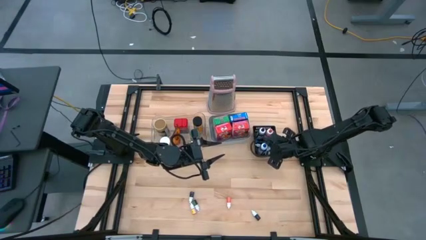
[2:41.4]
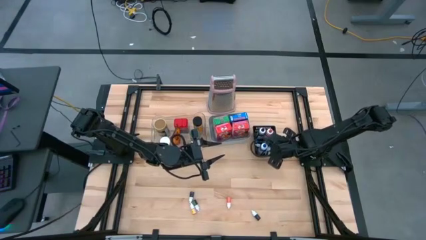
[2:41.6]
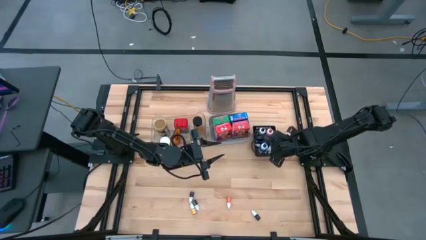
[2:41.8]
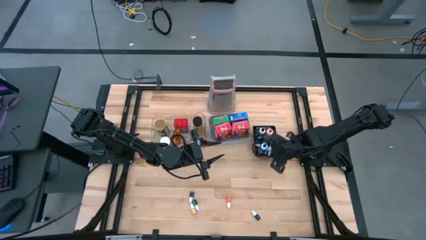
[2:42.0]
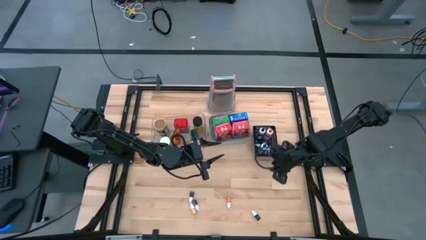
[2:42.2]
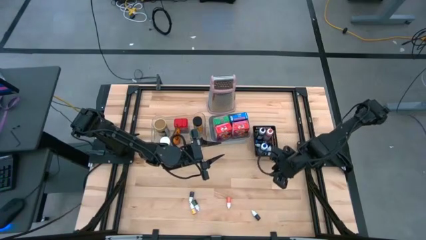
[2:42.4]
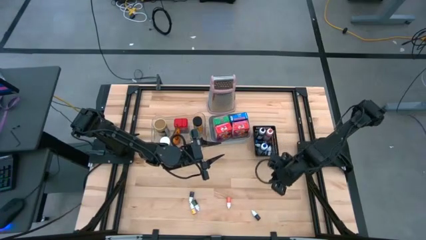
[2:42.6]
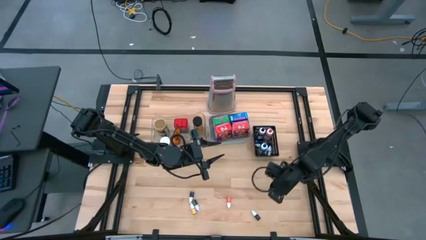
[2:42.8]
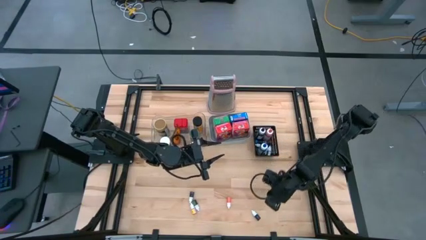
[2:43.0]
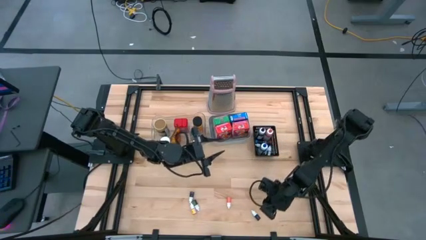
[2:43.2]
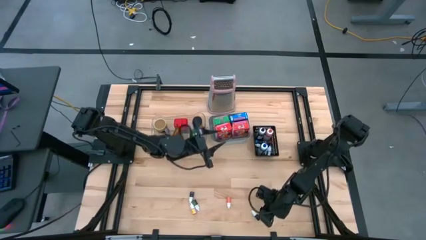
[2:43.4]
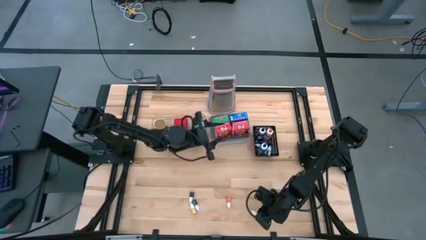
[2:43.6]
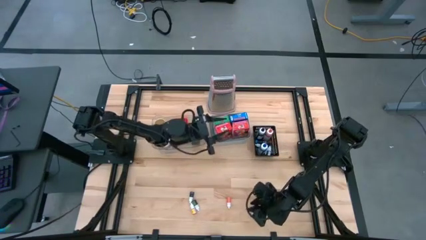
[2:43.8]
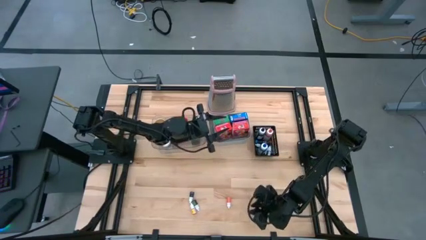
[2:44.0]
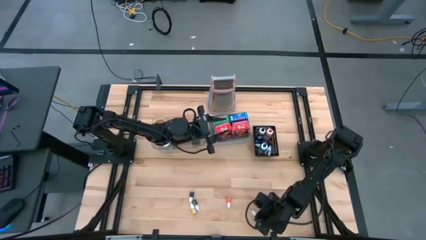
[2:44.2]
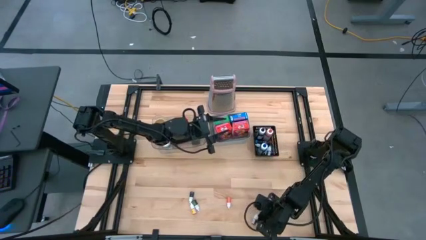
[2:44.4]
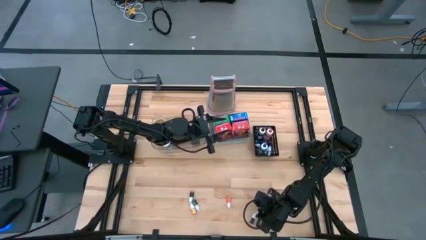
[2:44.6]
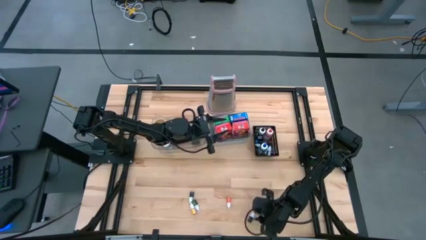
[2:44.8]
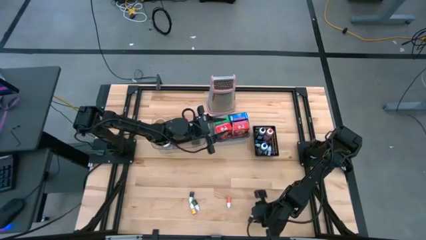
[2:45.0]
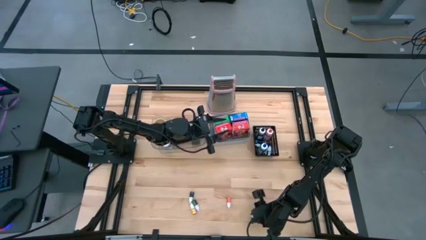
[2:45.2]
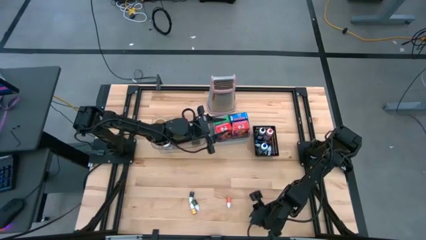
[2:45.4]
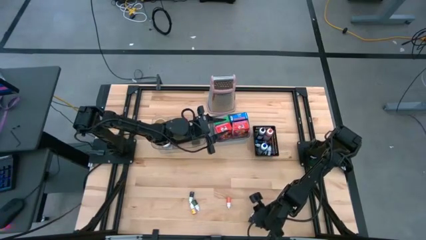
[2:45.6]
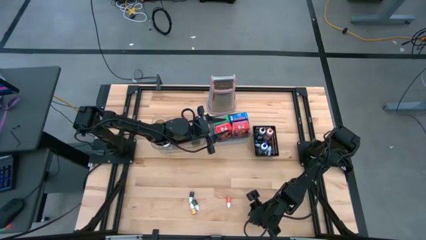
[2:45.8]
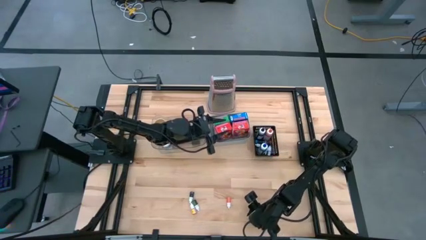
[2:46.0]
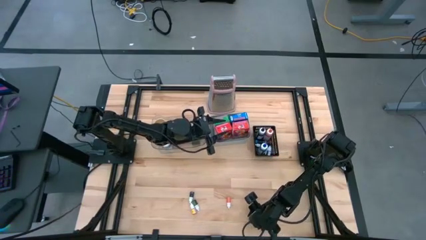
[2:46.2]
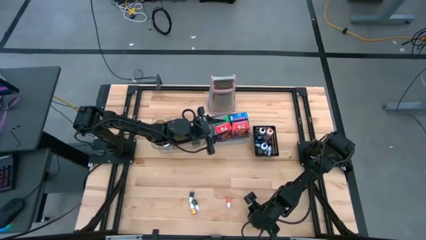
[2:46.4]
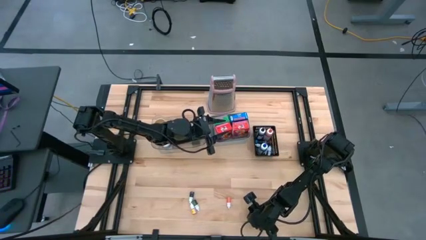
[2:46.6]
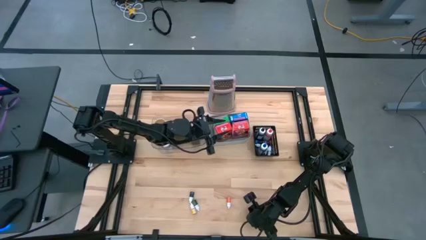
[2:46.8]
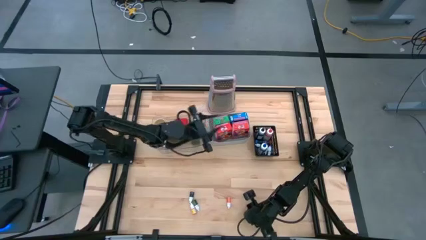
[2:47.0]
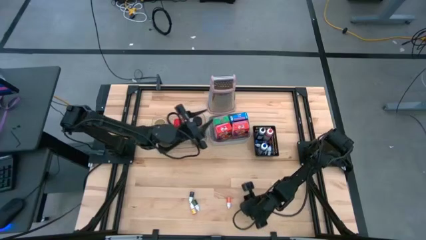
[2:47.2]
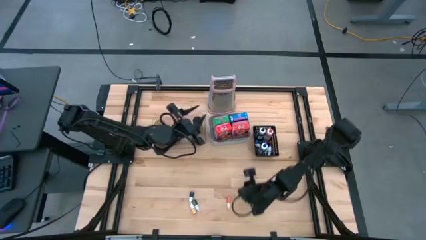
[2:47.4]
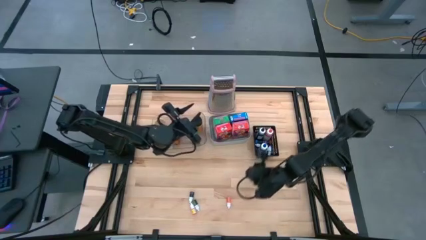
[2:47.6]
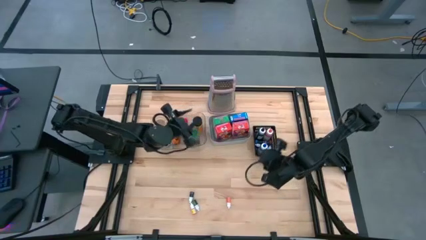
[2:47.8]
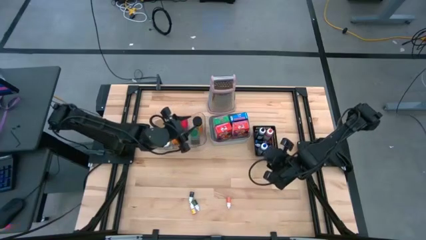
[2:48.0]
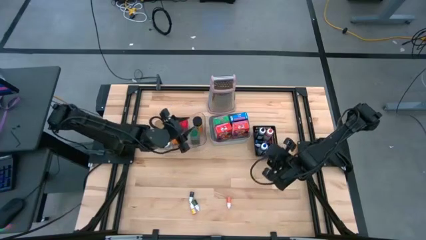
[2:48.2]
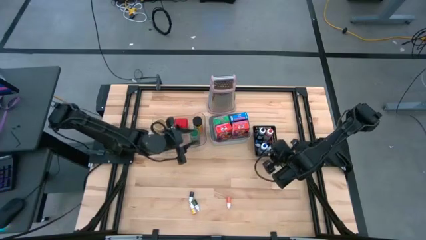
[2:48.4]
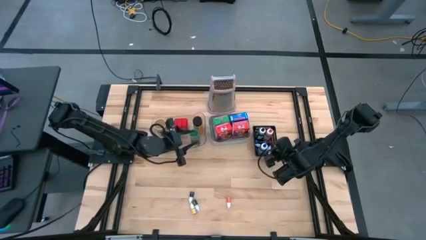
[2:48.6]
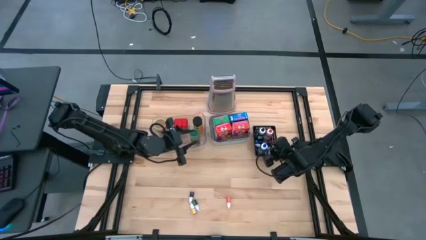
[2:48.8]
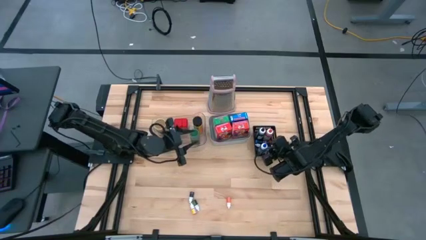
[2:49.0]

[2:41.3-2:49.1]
Task: Pick & Place Kitchen Items
Put the small red food coloring bottle into the black basket

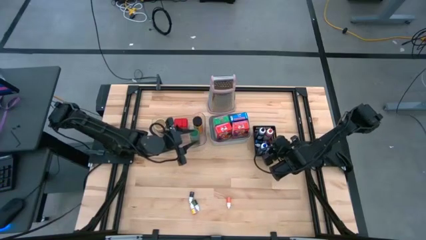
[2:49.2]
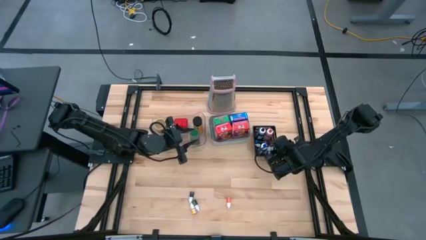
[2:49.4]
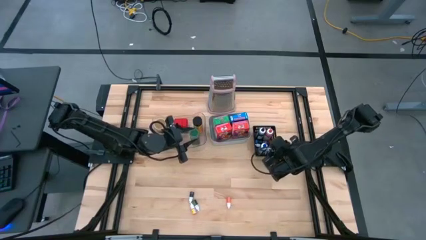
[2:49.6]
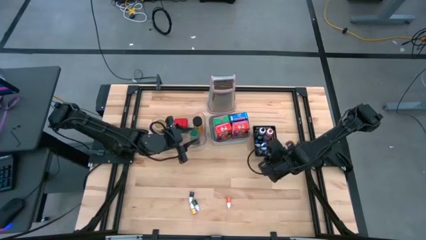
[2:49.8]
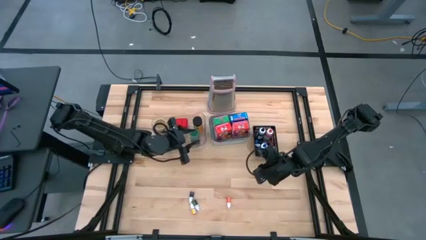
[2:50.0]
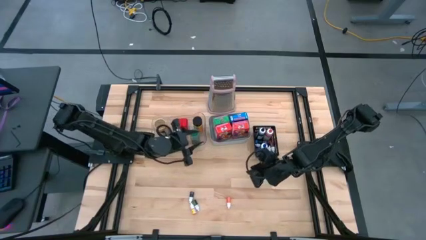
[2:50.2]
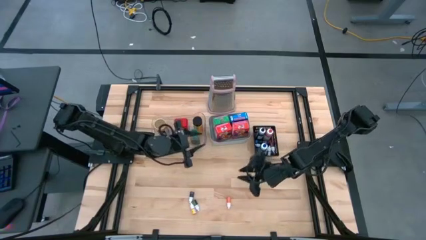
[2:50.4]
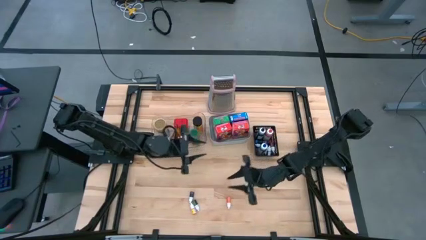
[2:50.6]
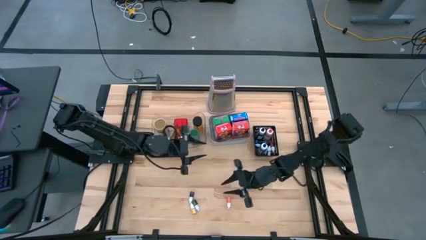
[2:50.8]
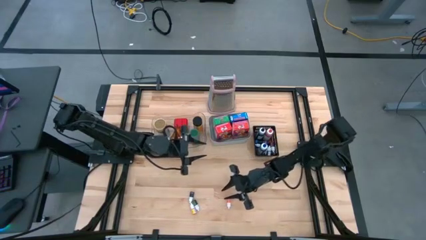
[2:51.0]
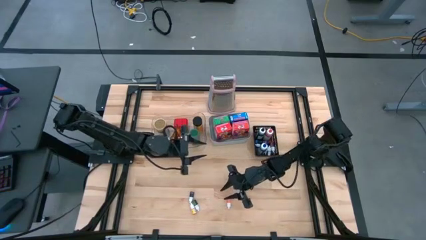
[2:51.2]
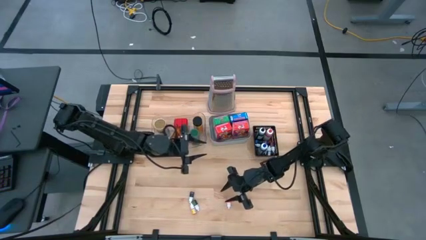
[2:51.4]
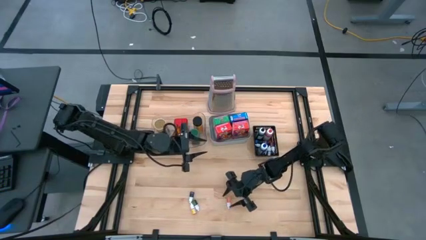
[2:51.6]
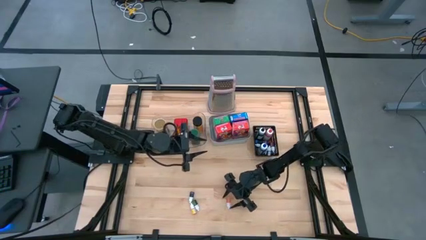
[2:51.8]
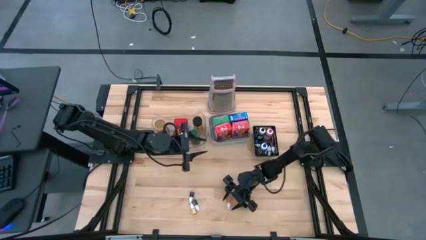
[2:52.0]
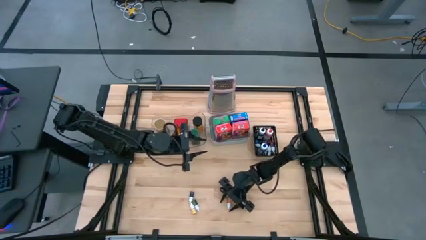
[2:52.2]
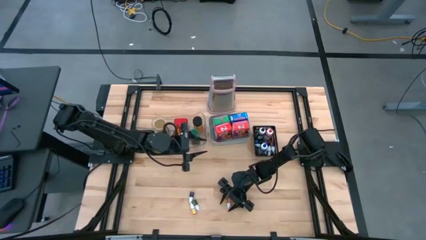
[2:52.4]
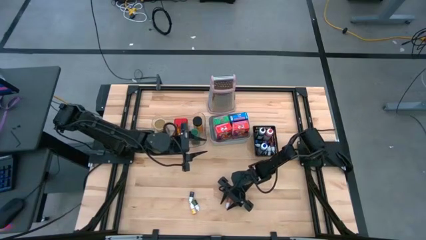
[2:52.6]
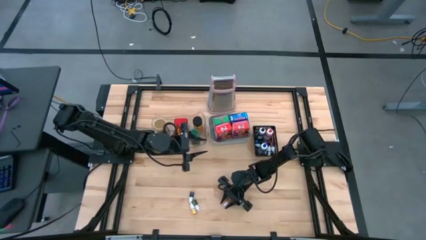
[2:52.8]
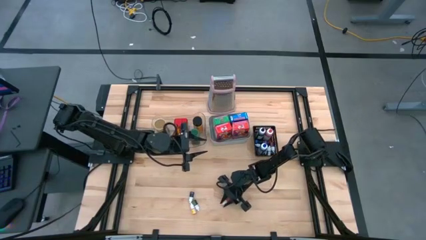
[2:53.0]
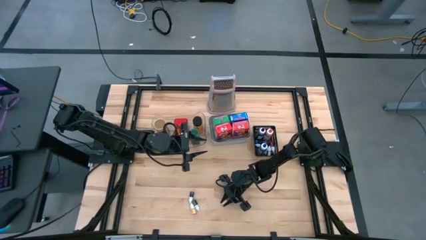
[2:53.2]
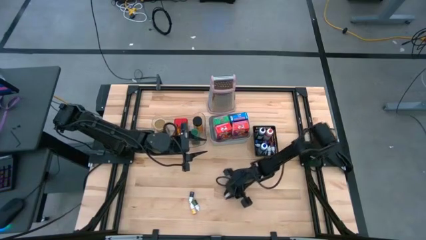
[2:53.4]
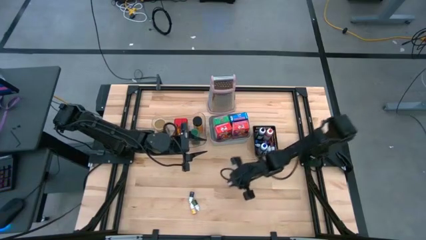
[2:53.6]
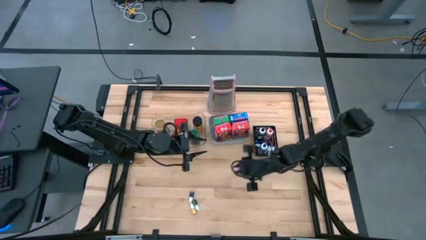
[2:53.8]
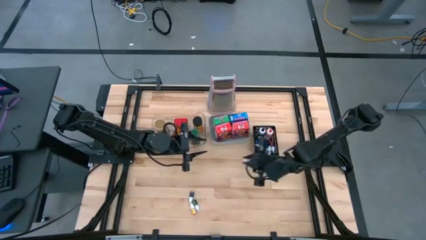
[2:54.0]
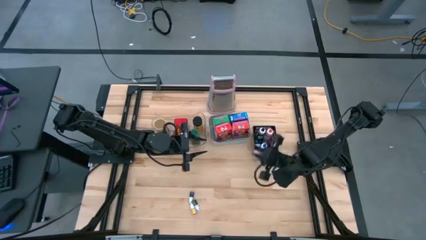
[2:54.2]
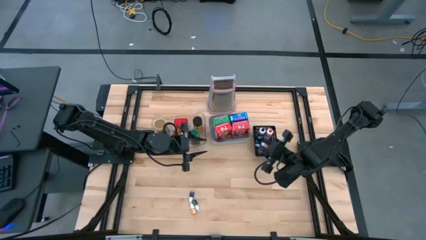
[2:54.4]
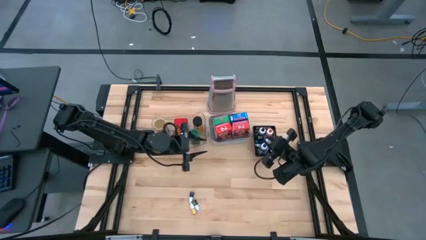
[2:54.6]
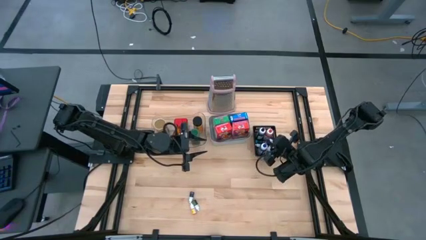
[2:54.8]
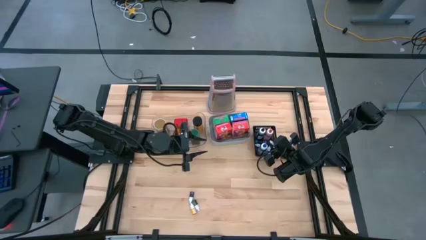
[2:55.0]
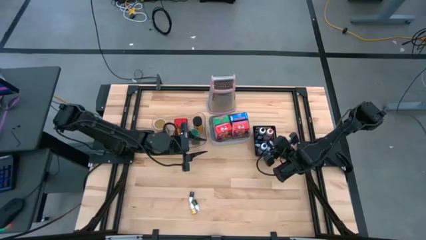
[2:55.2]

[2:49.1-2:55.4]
Put the right small orange food coloring bottle into the black basket

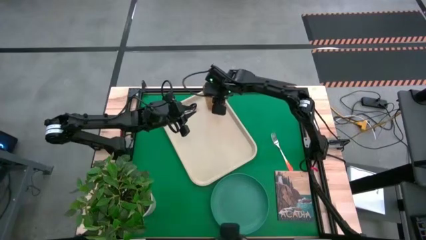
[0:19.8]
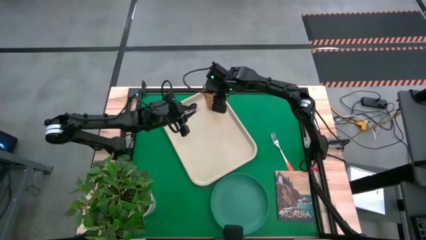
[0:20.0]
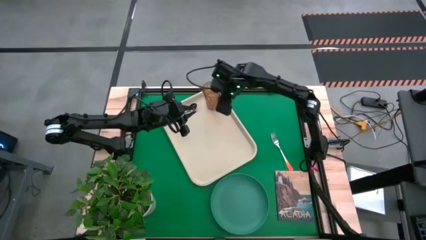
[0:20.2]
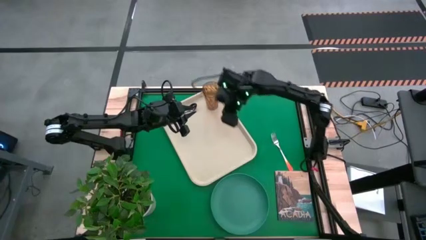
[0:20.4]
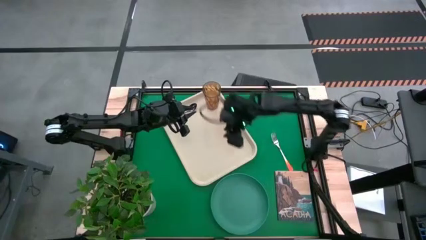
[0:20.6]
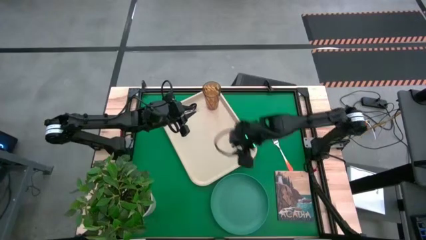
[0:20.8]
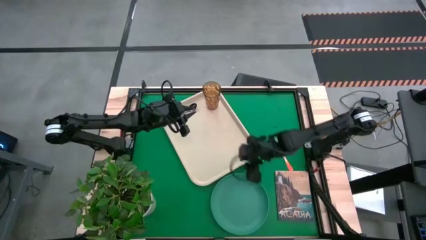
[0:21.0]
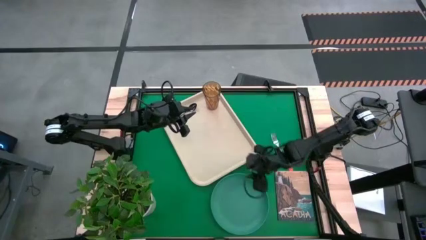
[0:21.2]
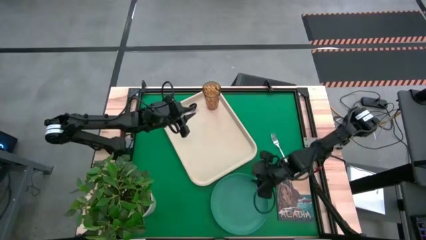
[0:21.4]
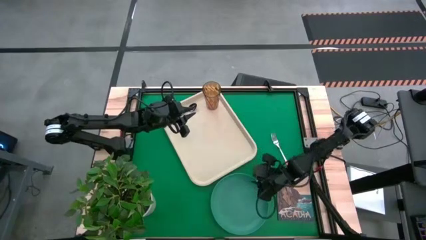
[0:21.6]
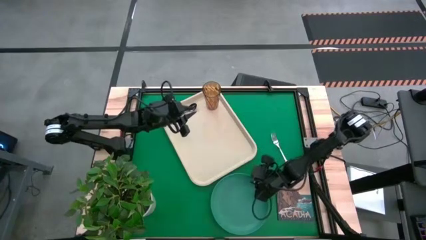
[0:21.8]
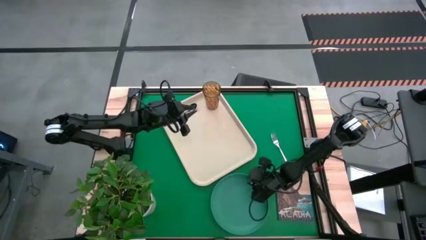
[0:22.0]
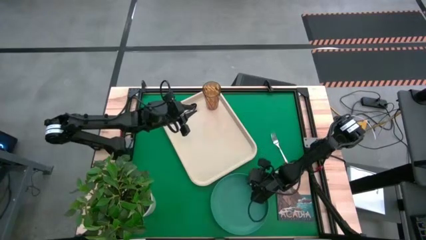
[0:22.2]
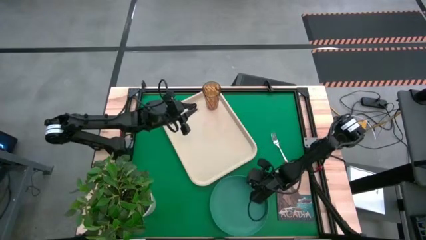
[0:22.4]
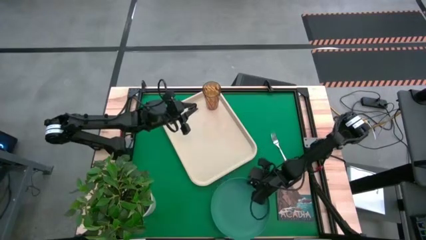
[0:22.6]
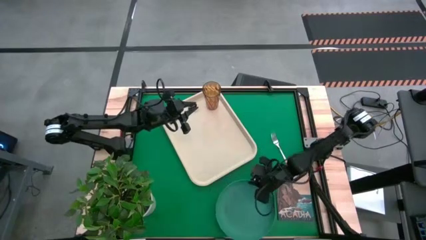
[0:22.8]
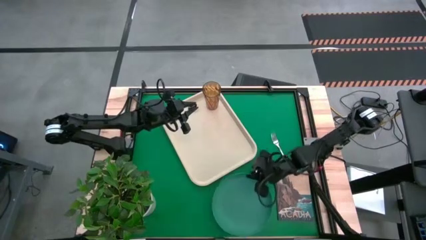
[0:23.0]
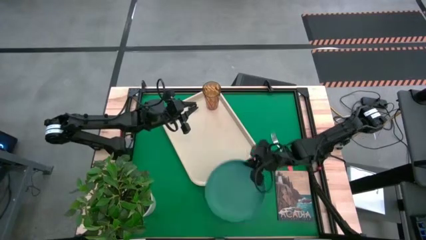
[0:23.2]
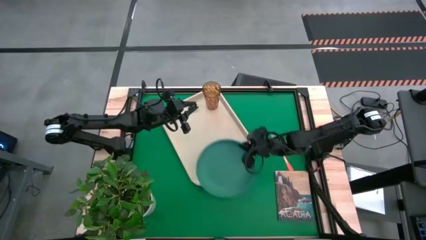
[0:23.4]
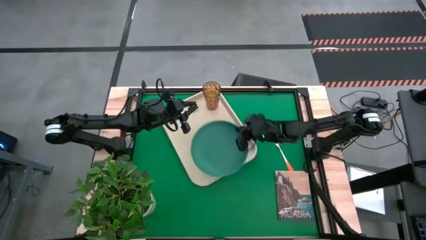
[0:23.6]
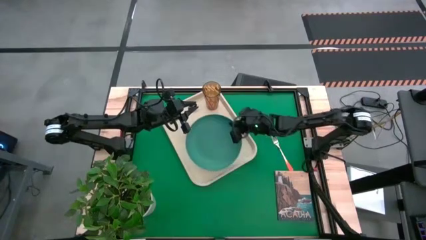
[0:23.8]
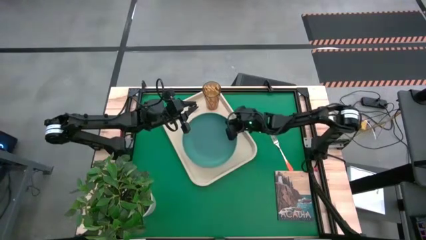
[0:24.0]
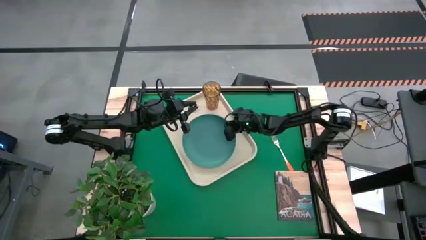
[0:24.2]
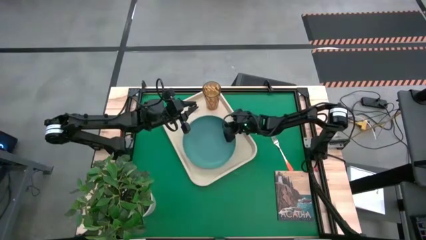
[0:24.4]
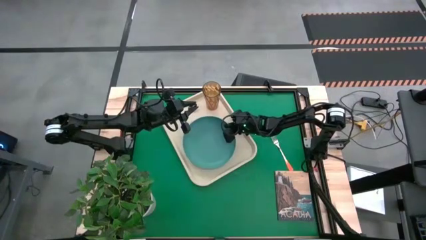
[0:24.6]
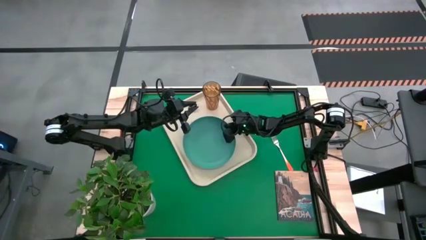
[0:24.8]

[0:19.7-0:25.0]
Task: Pick and place plate/cup/fork/spoon on tray
Put the green plate on the white tray under the yellow glass
